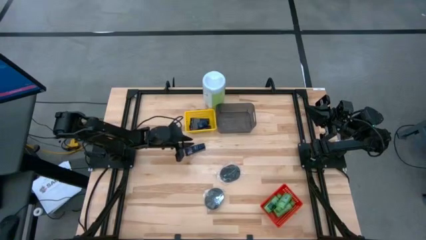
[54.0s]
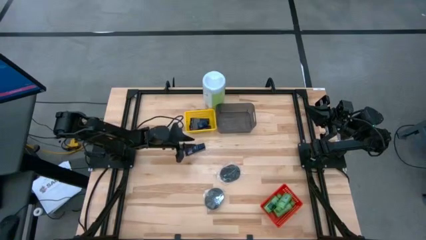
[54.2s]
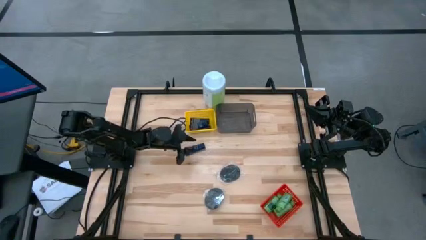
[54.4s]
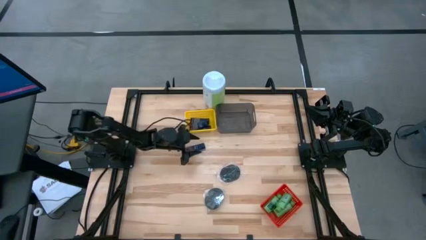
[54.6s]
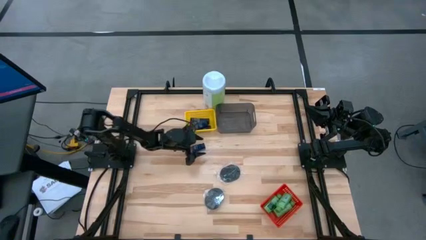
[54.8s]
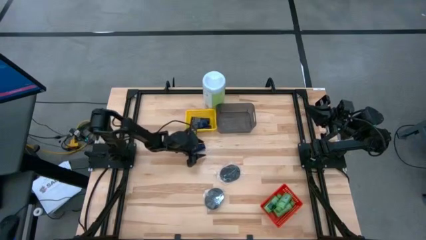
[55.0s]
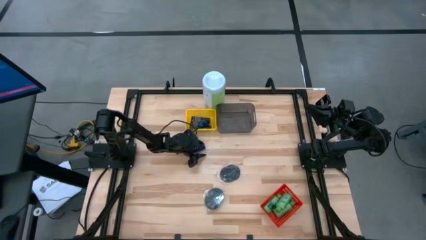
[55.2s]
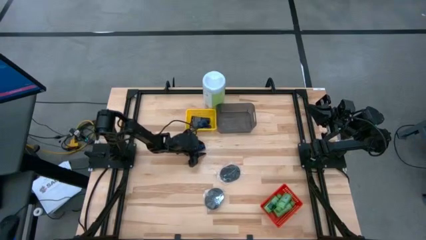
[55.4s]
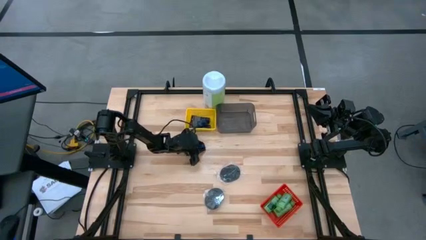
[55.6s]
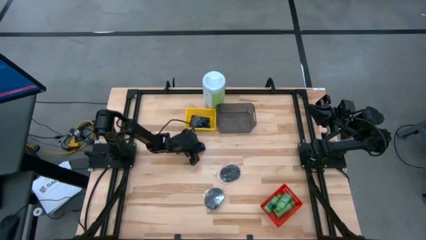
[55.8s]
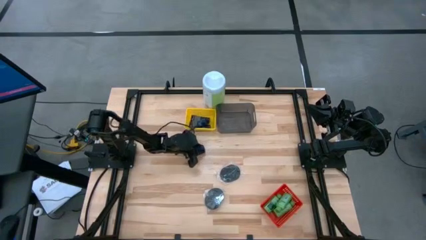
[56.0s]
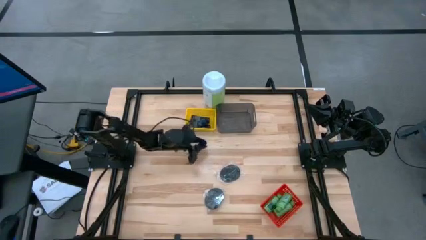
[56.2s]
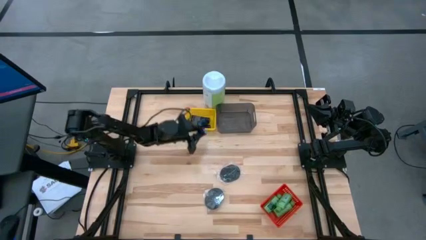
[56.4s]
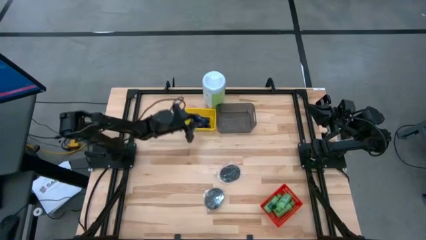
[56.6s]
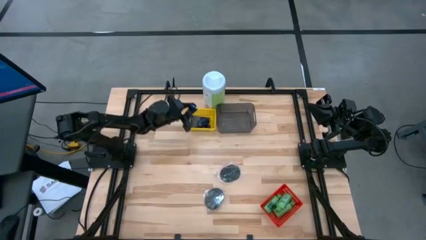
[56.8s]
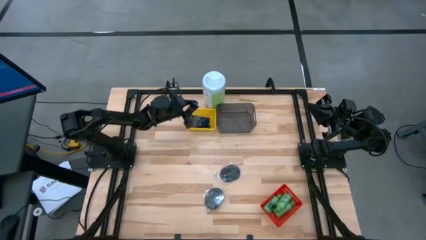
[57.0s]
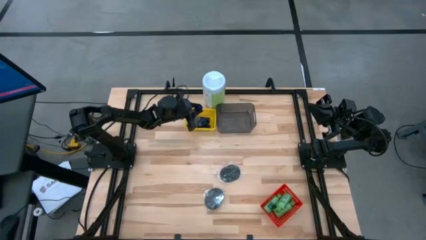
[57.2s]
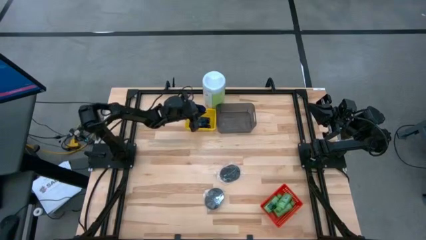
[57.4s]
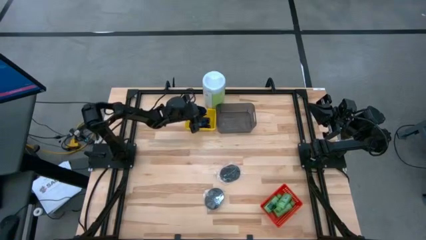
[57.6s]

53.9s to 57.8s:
Task: Pick & Place Travel size toiletries
Put the dark blue shaving cream into the yellow basket

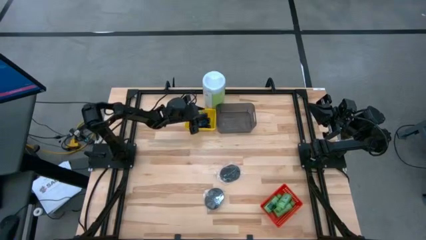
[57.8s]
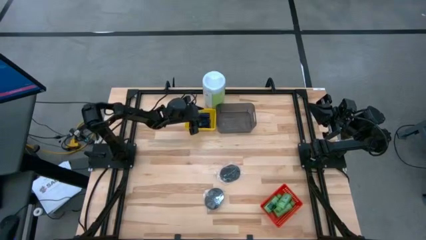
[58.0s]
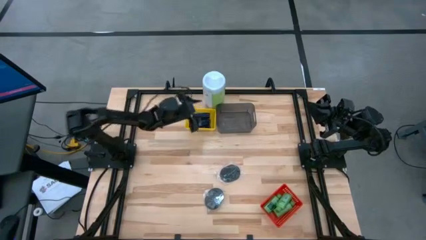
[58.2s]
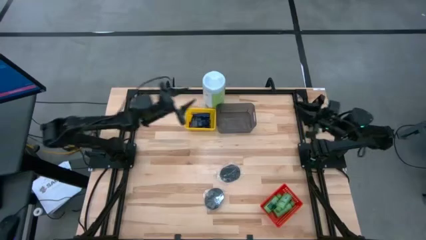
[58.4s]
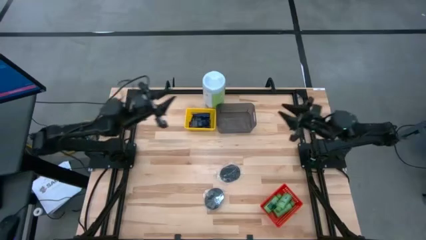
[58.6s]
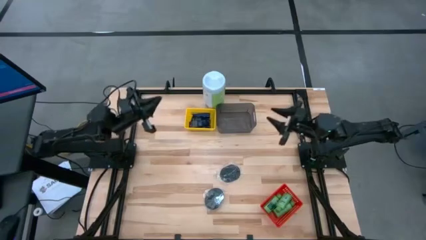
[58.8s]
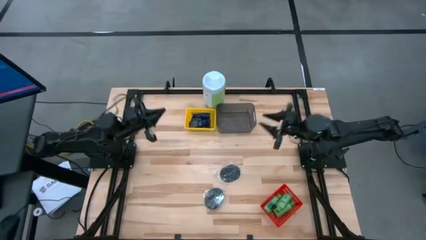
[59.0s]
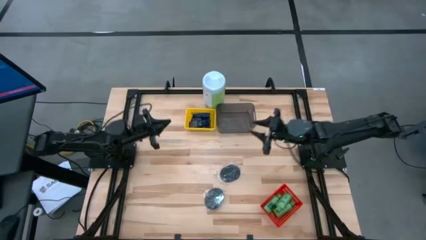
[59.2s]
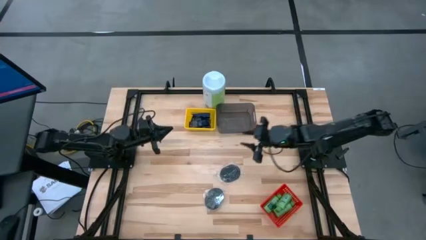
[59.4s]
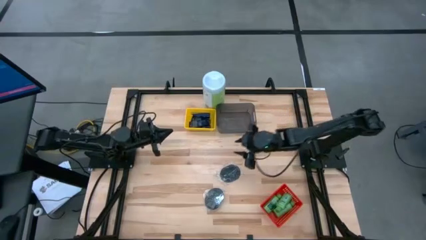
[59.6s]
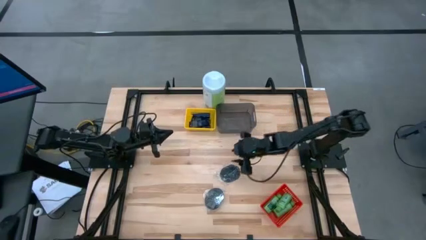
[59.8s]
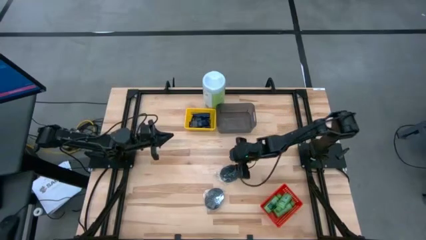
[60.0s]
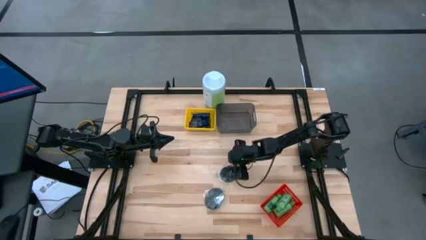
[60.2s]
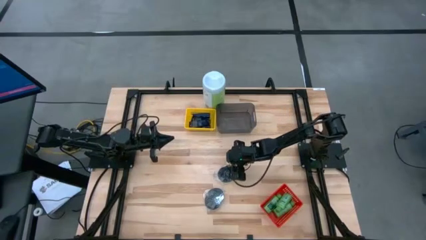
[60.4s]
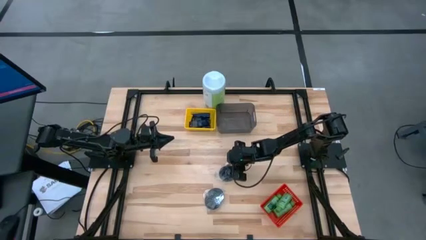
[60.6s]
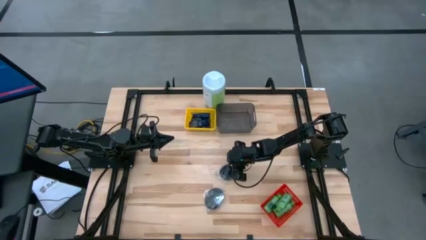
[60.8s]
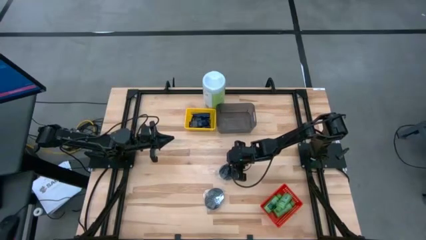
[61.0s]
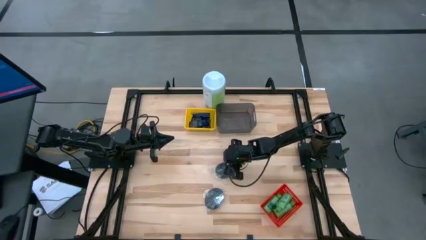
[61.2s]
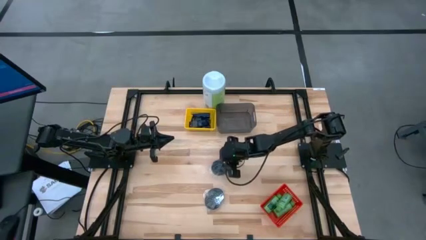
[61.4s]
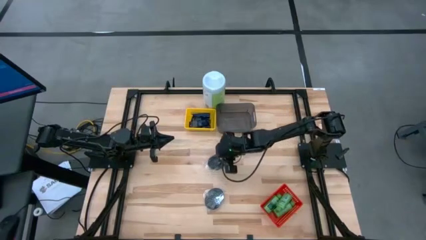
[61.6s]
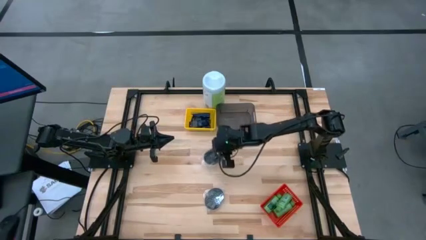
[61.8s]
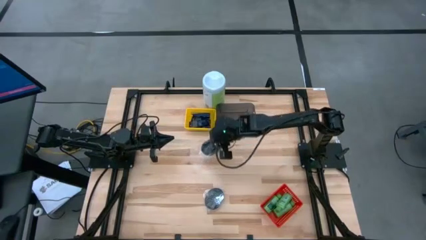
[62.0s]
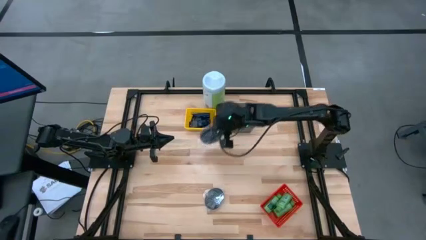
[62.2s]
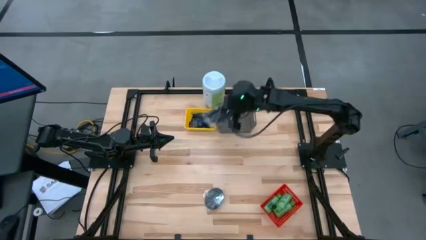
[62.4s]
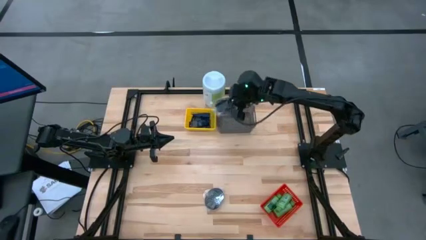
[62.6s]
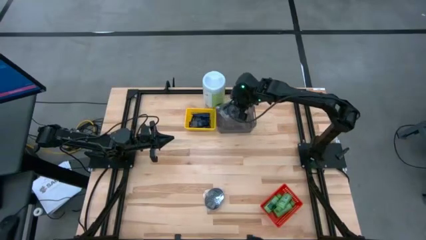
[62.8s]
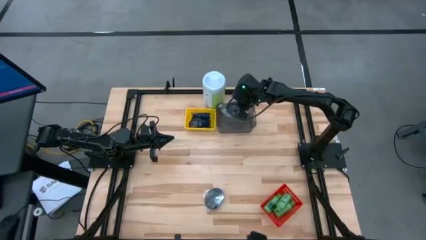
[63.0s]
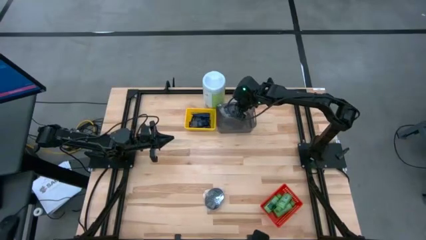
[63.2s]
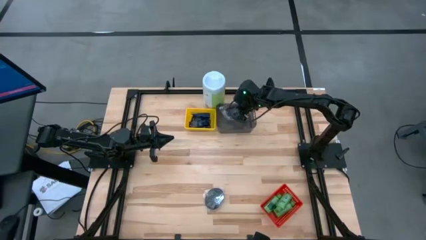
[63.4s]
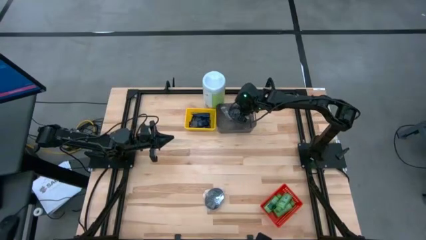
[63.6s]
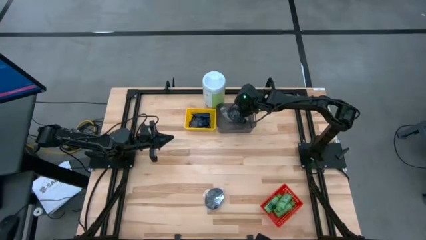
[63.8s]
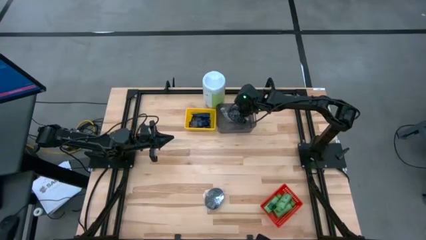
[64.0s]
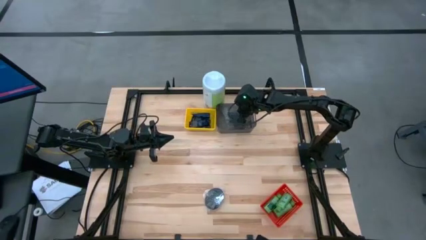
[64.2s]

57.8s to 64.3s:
Put the hairbrush into the gray bin

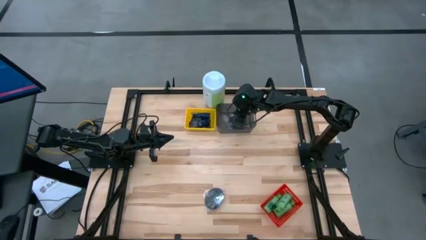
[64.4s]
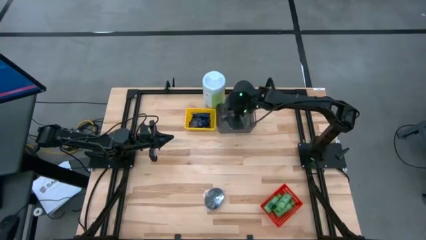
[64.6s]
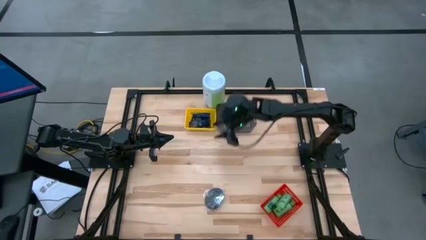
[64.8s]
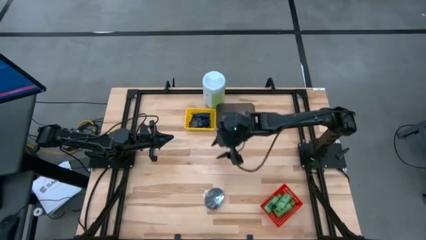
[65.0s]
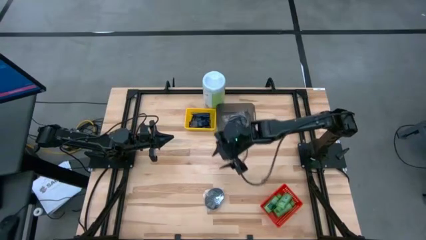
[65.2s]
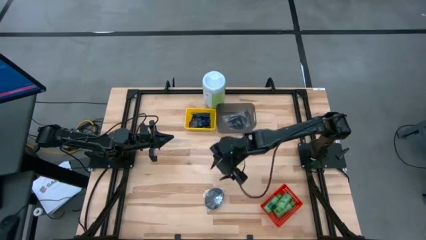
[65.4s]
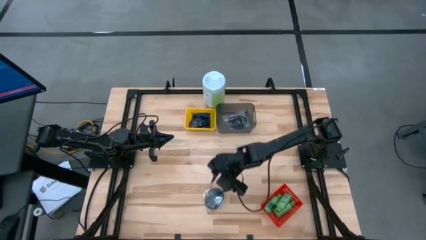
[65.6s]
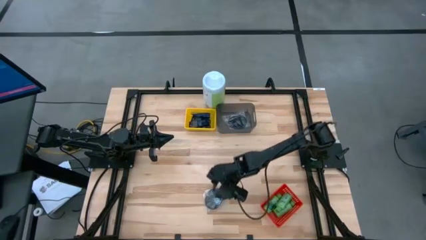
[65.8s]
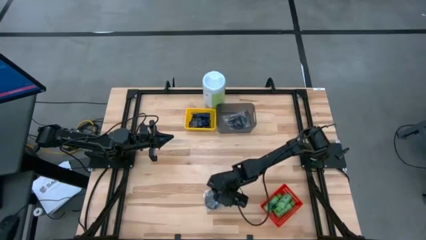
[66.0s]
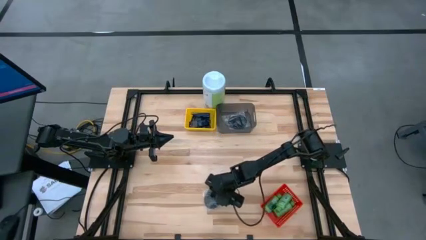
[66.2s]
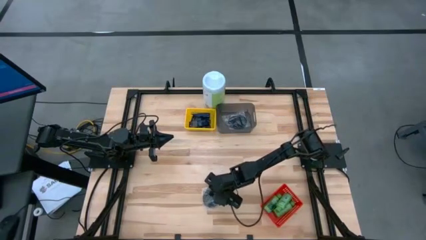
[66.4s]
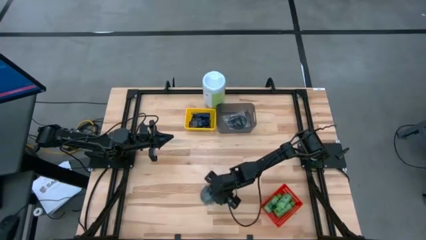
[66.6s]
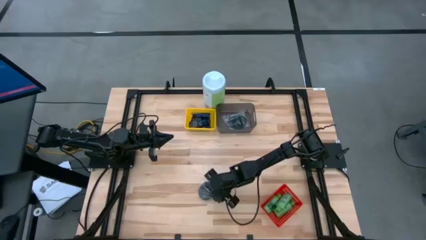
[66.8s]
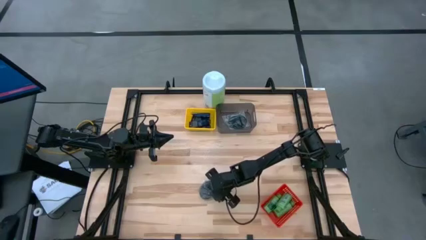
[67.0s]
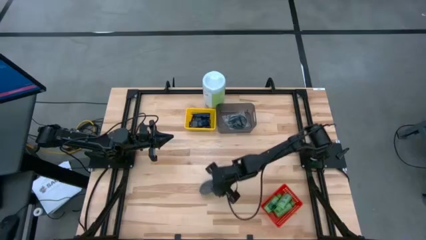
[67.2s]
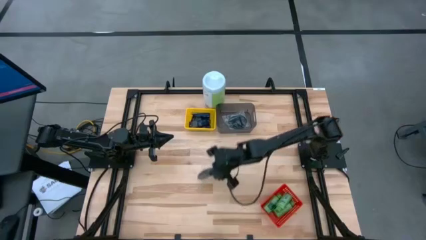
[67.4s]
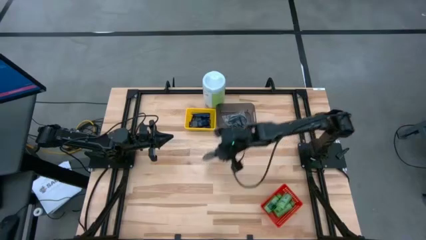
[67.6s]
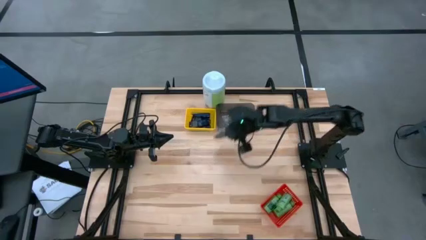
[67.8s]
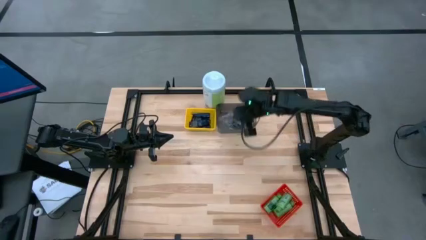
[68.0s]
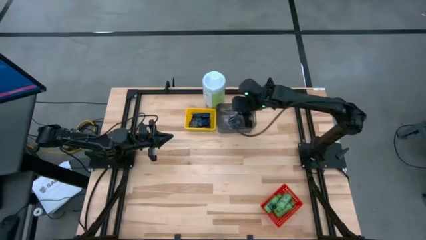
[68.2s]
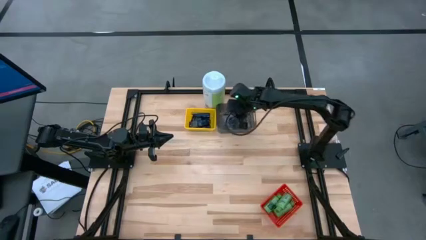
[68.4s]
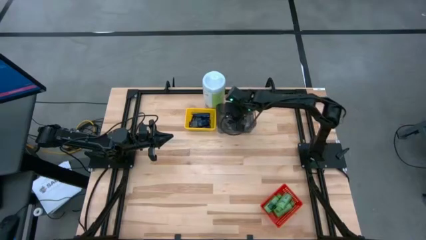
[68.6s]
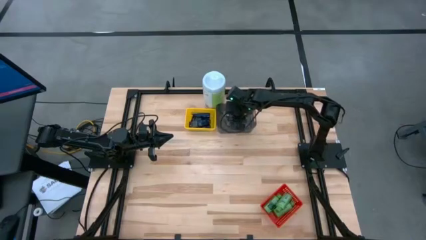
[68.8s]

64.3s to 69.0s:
Put the hairbrush into the gray bin

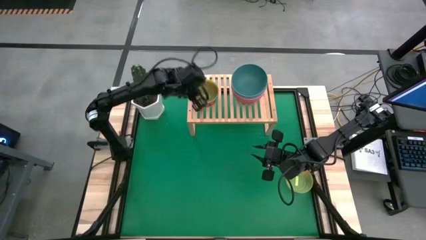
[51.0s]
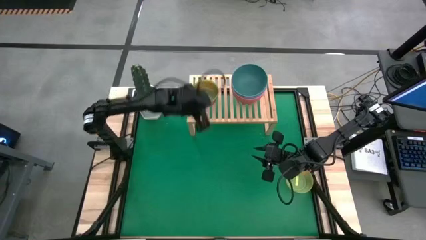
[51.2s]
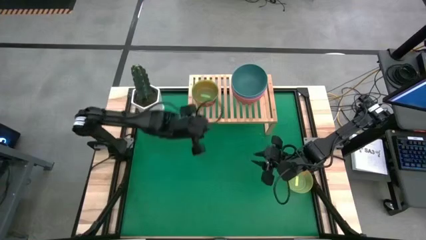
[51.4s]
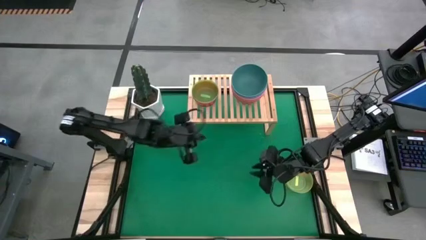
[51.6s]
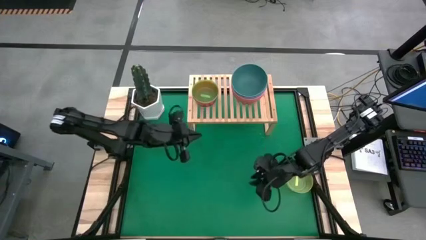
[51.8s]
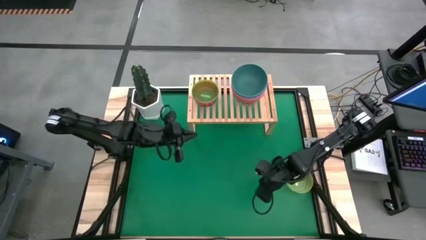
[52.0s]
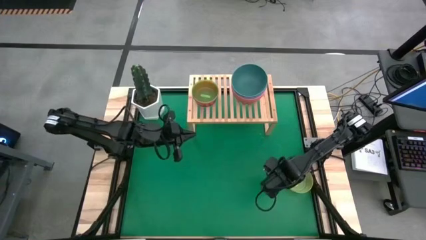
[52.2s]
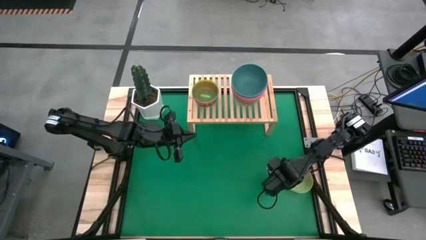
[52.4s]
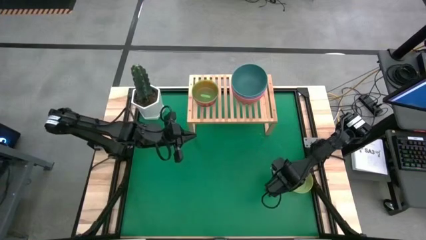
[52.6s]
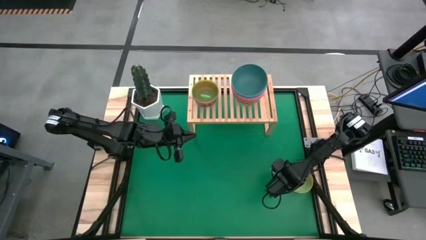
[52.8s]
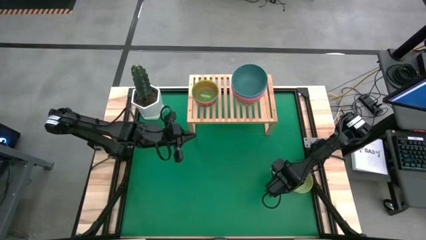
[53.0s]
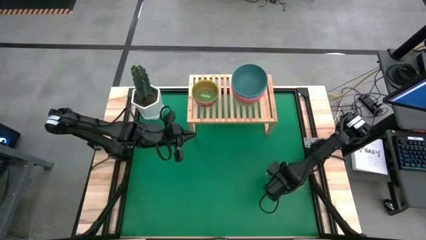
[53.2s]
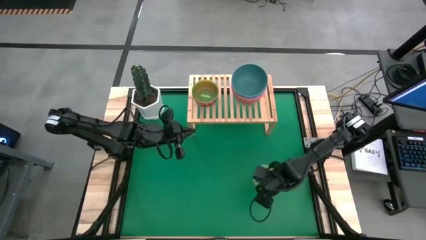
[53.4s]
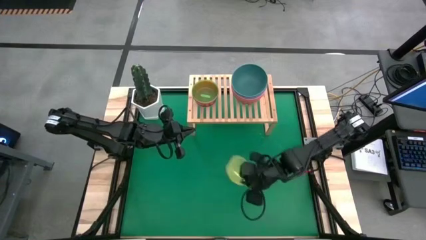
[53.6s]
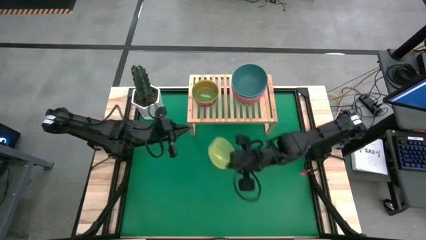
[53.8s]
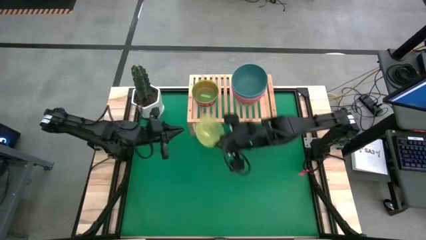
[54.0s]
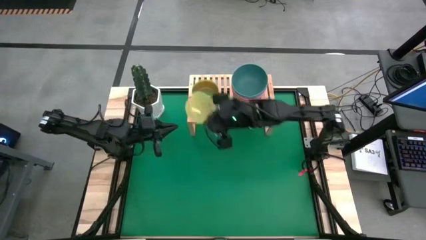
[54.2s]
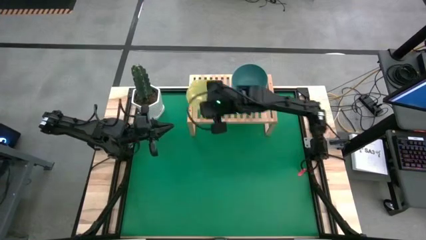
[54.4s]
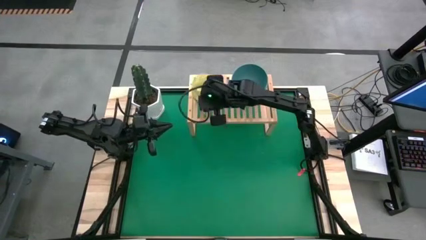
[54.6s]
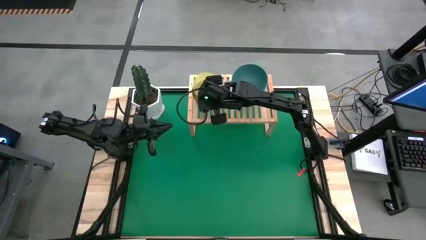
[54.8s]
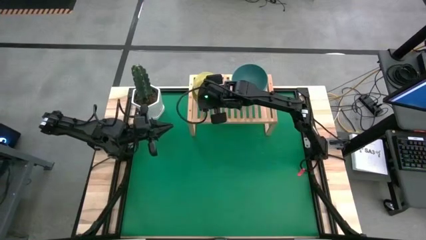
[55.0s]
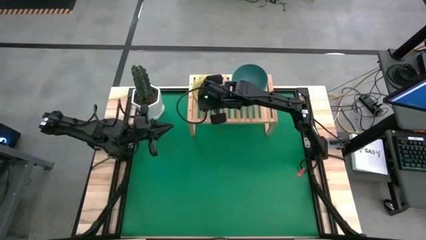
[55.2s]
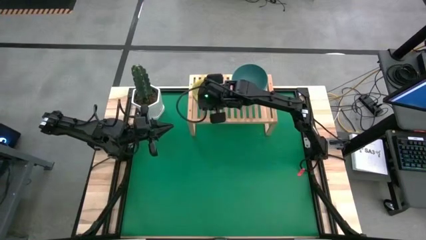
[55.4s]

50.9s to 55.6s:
Task: Place and stack bowls onto a shelf
Stack the yellow bowl on top of the green bowl on the shelf
